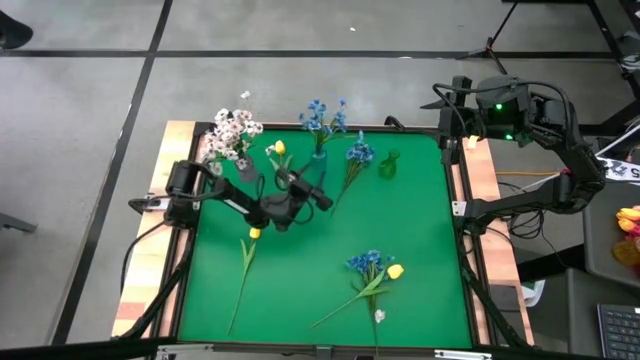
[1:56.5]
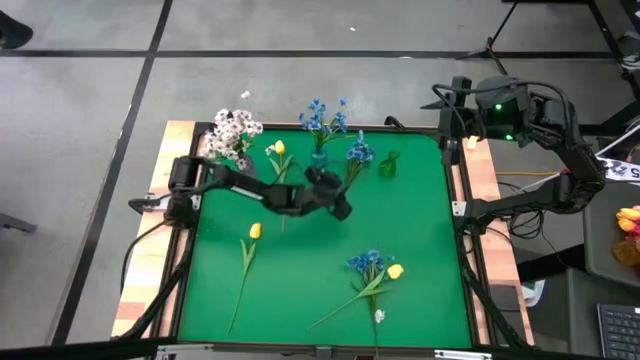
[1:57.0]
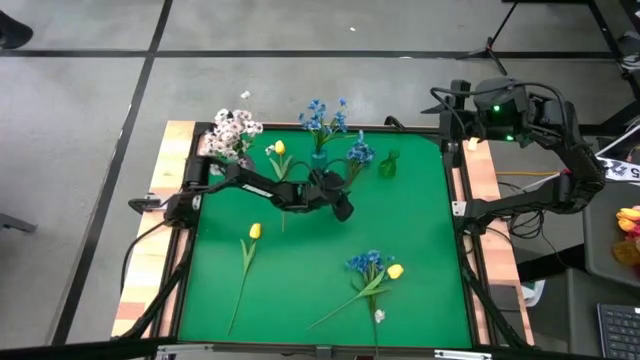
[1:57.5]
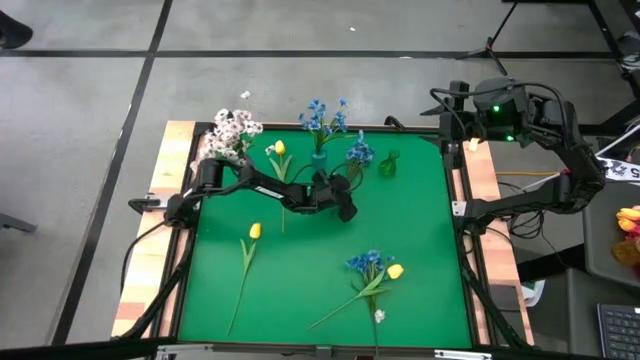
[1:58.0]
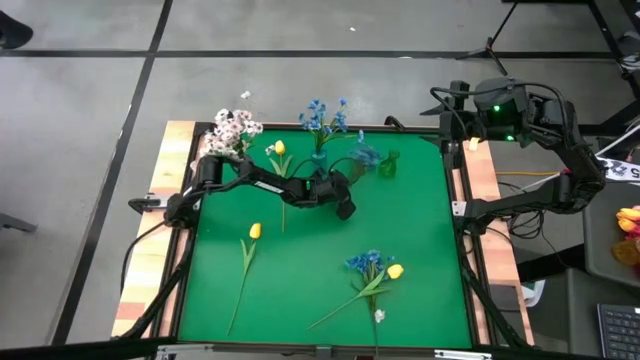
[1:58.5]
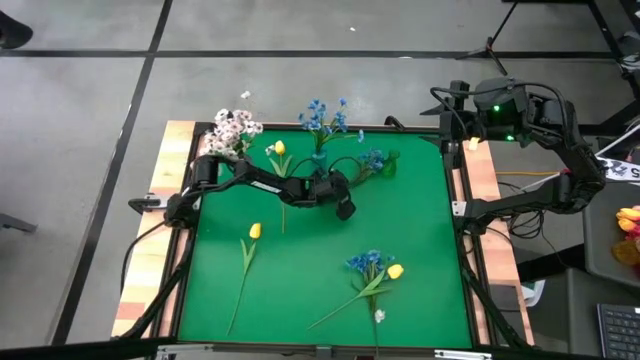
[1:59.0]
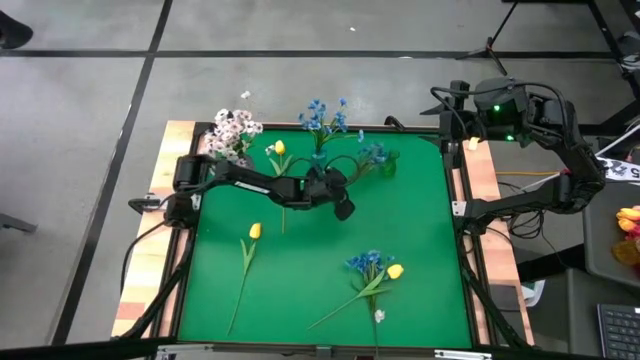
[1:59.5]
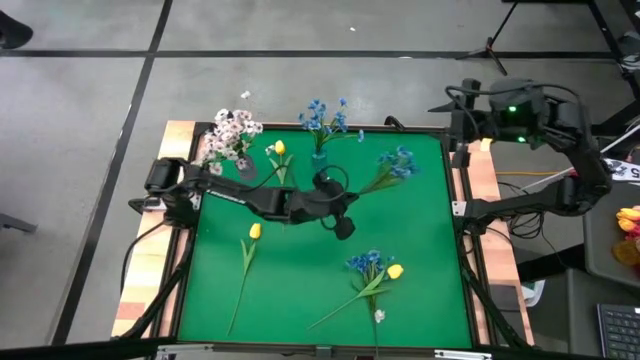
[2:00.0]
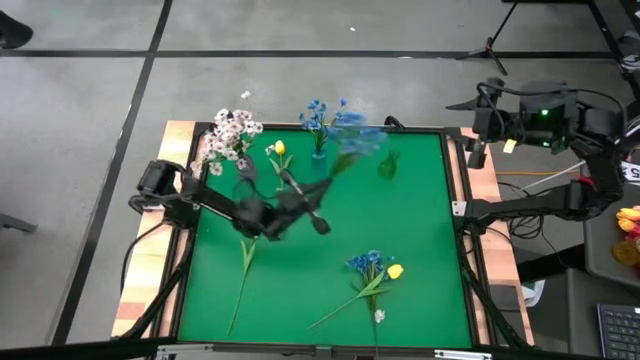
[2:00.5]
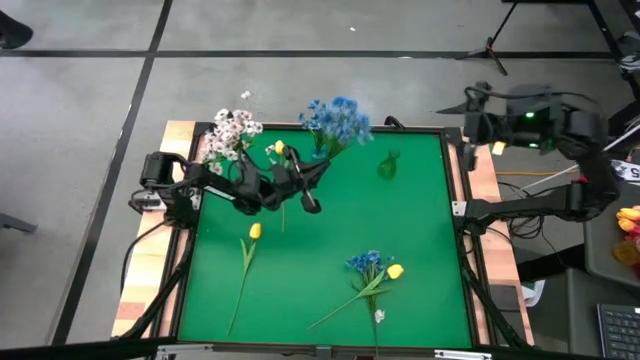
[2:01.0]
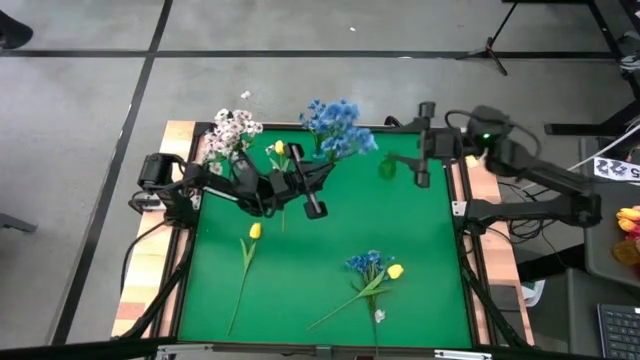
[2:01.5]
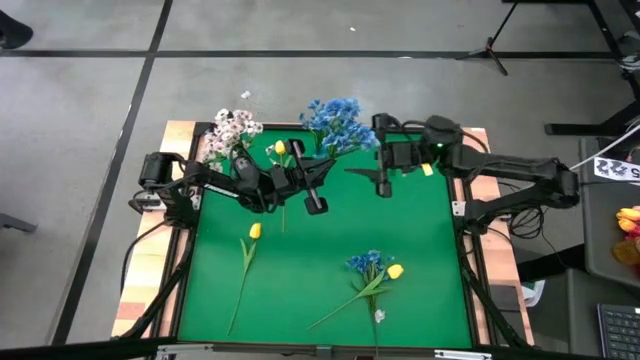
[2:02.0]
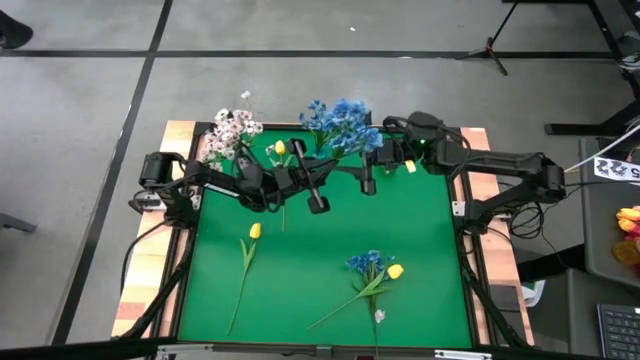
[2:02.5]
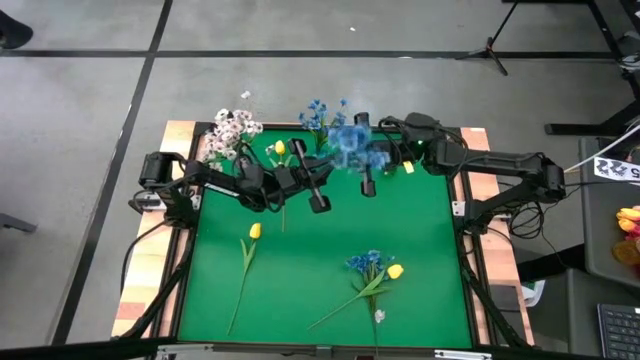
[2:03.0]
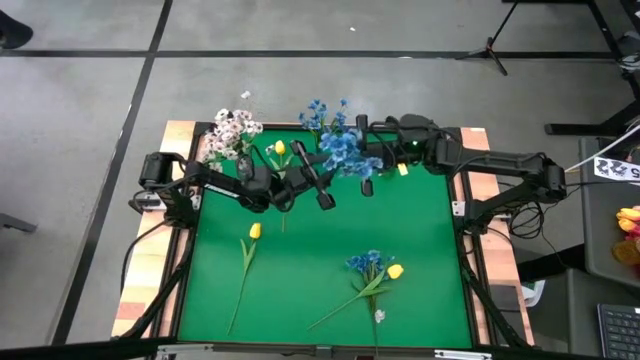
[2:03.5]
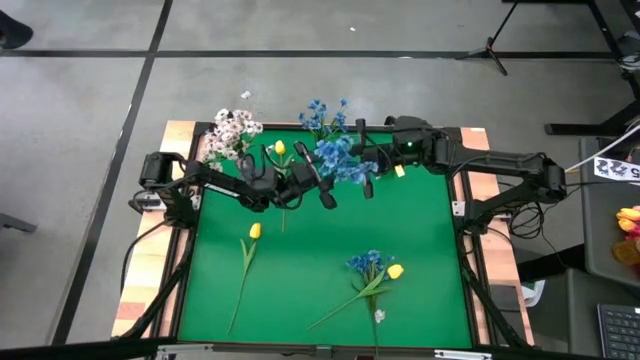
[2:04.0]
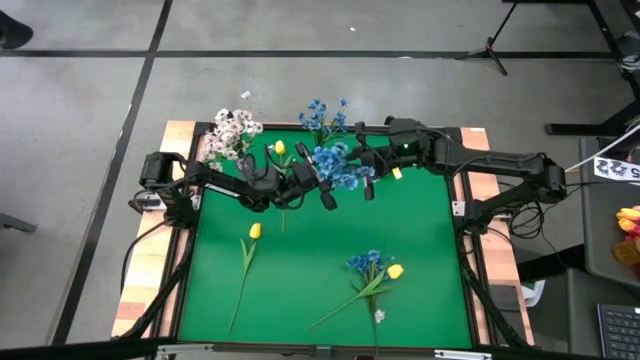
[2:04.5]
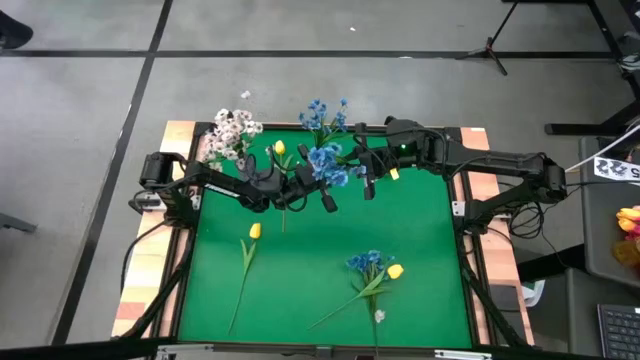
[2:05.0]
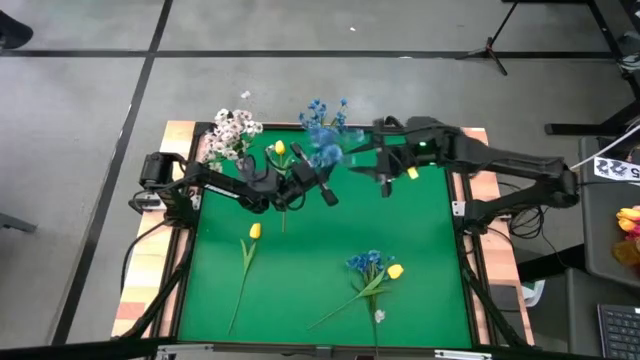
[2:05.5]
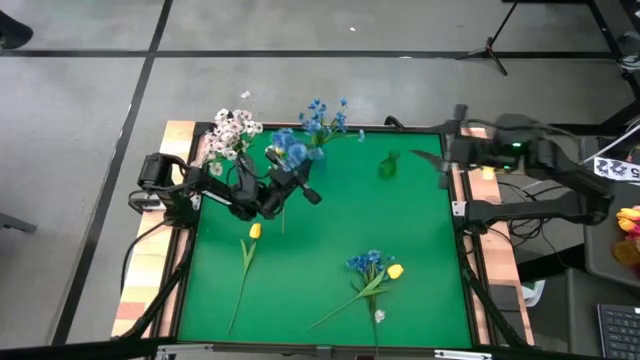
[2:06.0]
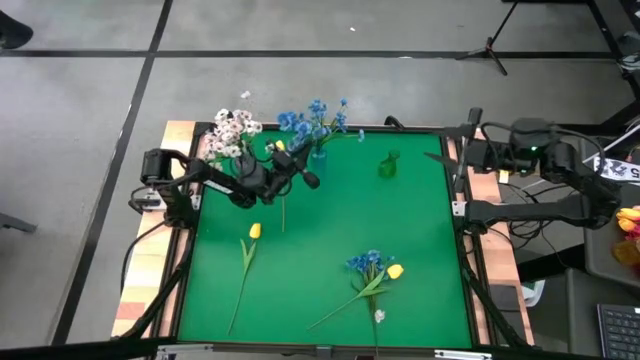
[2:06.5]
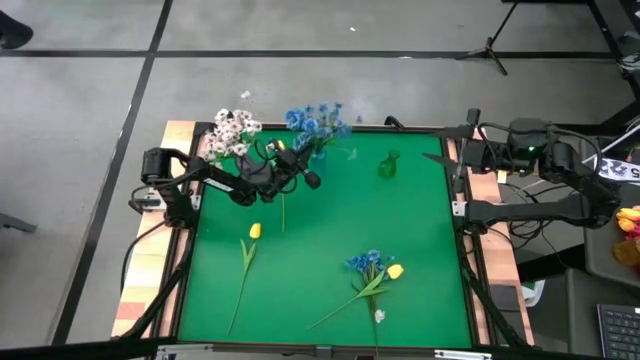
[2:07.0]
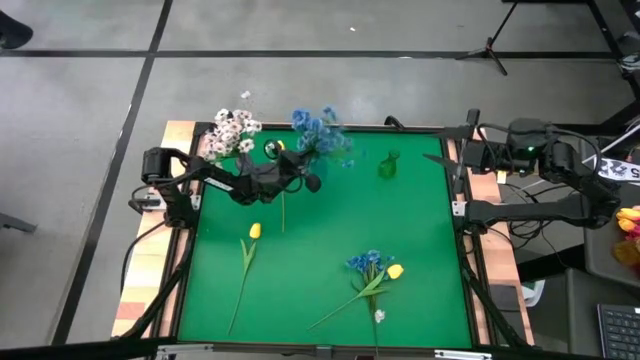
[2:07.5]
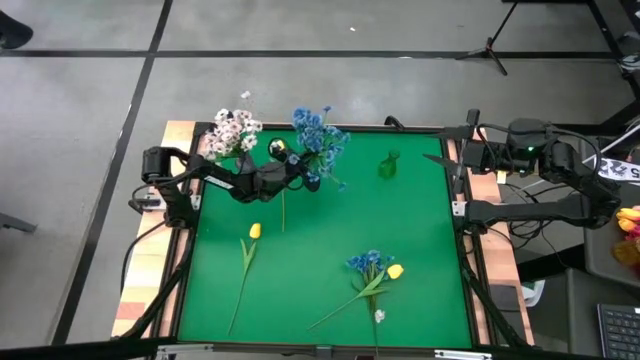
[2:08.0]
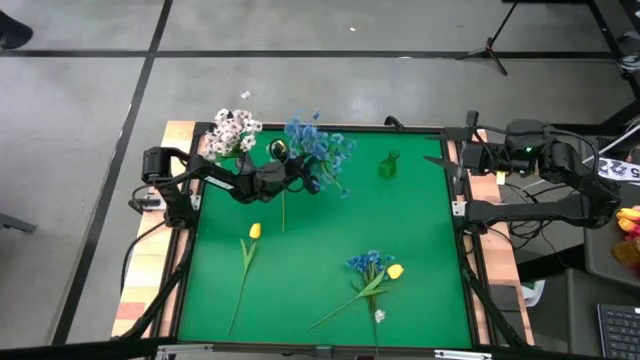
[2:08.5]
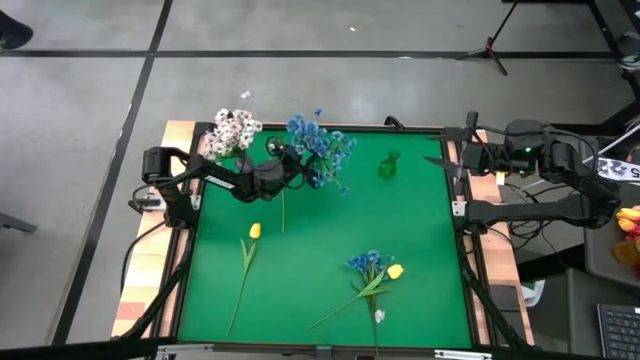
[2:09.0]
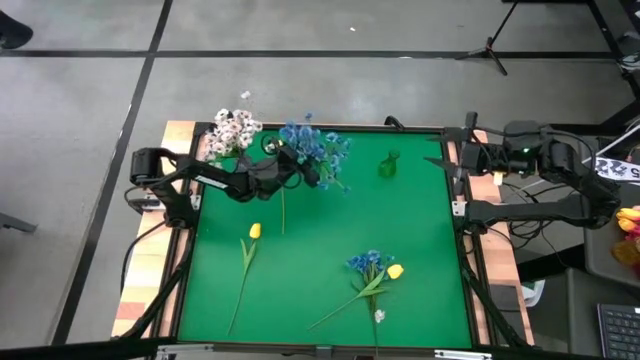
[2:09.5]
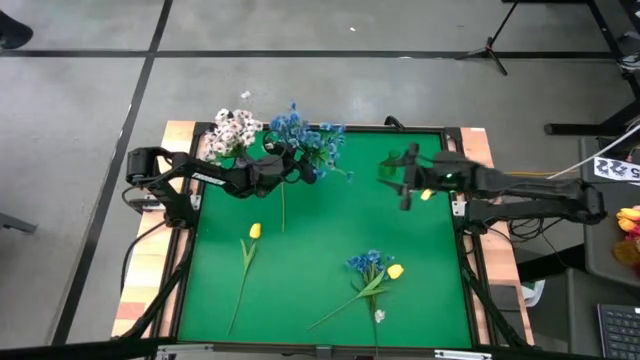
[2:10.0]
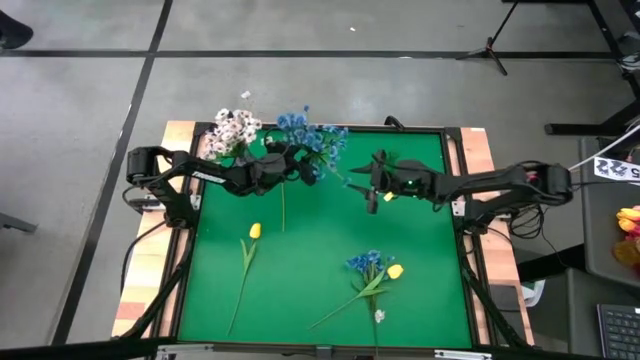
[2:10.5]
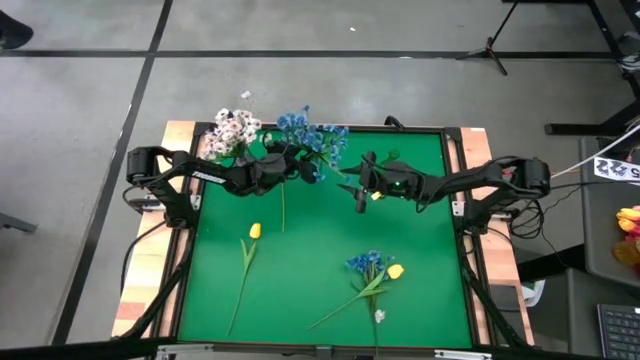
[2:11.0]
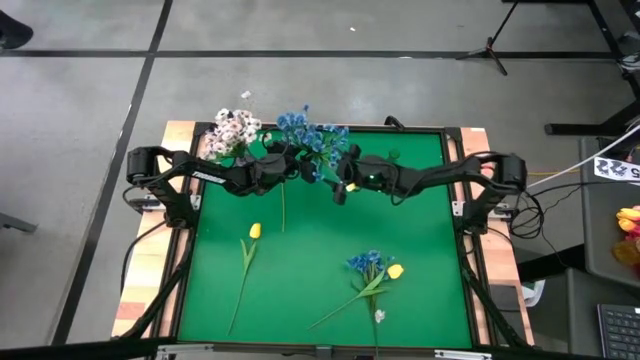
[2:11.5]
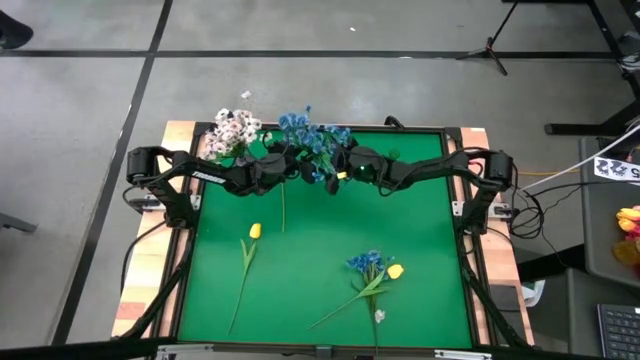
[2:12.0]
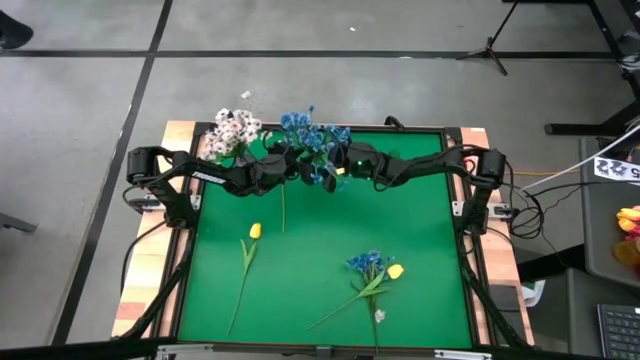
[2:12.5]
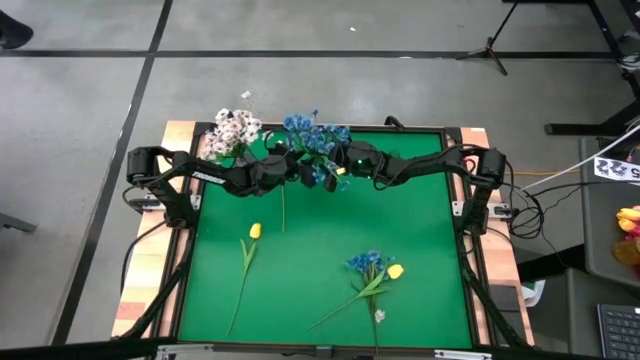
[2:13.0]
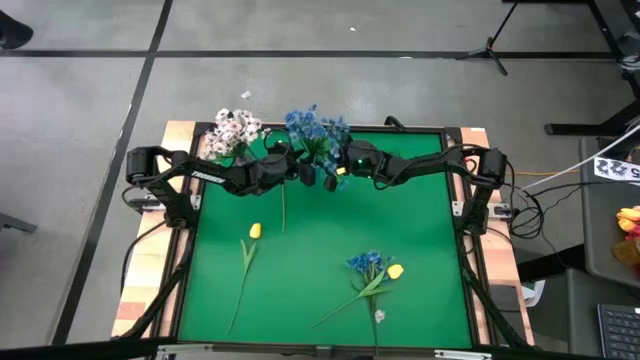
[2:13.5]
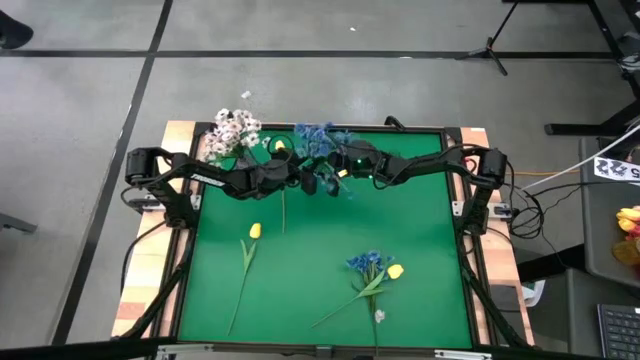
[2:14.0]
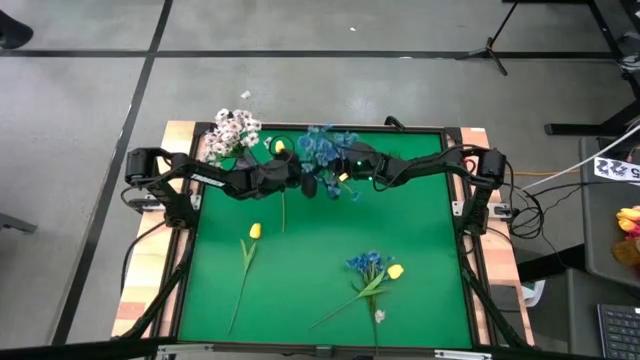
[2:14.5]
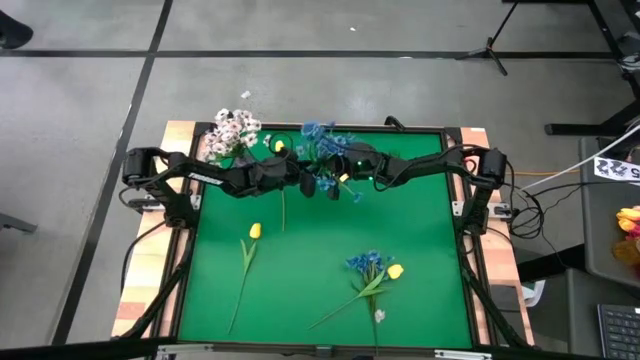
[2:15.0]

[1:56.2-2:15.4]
Task: Sort flowers into vase by color
Put the top blue flowers into the blue vase

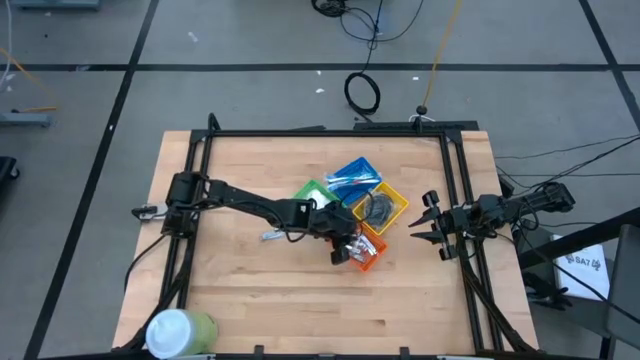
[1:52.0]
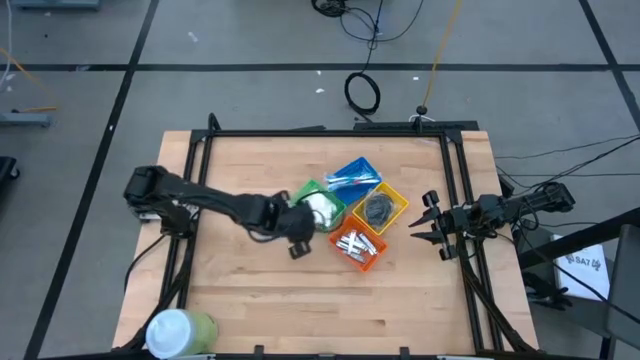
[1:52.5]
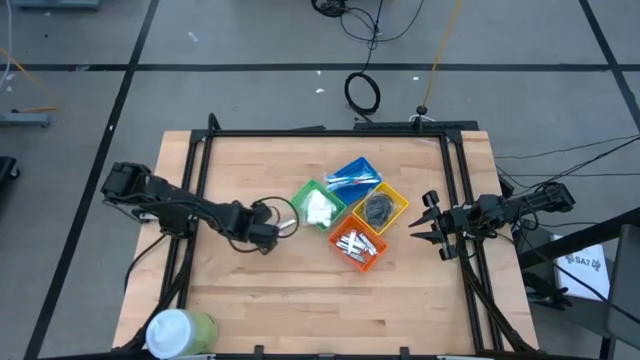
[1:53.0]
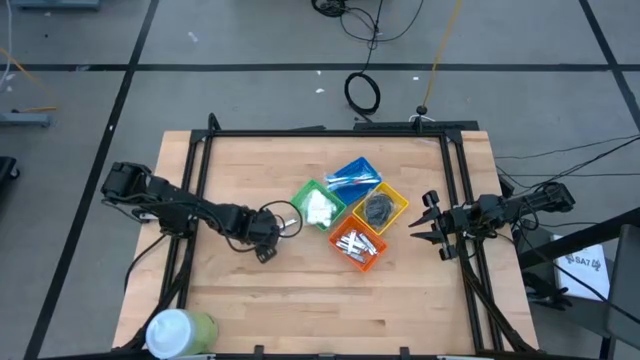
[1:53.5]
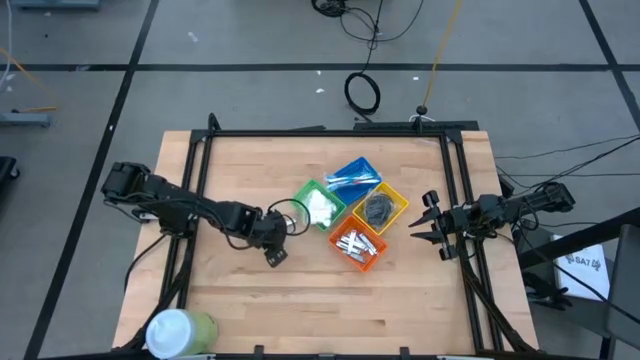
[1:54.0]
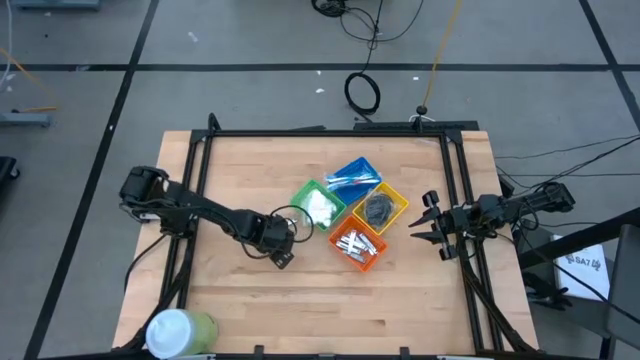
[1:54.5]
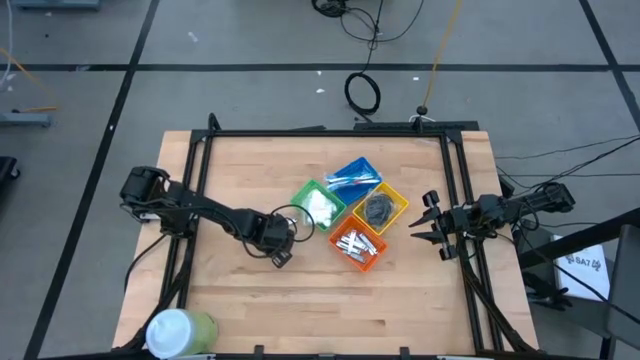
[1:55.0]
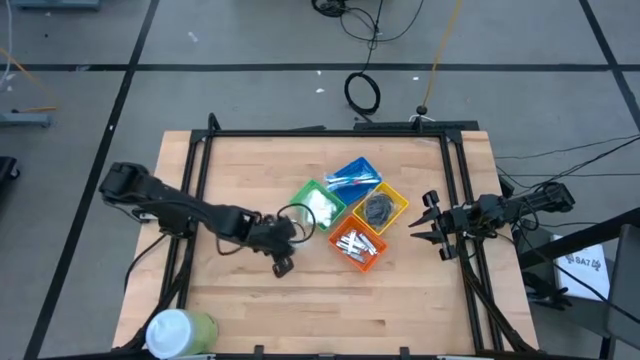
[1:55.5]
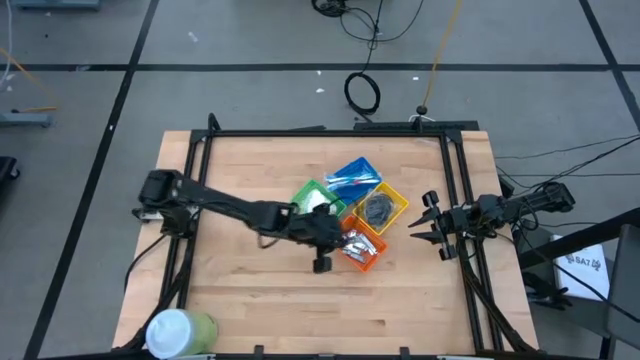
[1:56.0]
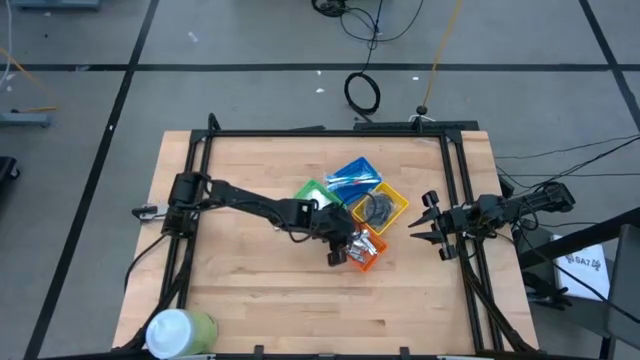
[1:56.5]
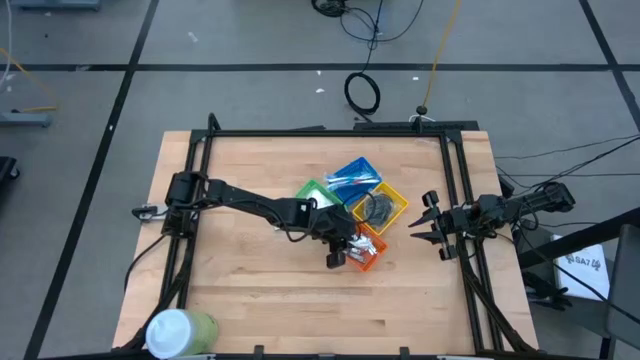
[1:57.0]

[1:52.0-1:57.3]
Task: Pick & Place Travel size toiletries
Put the silver nail cutter into the orange bin
